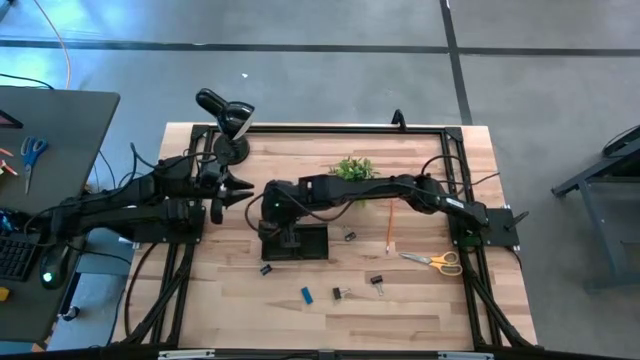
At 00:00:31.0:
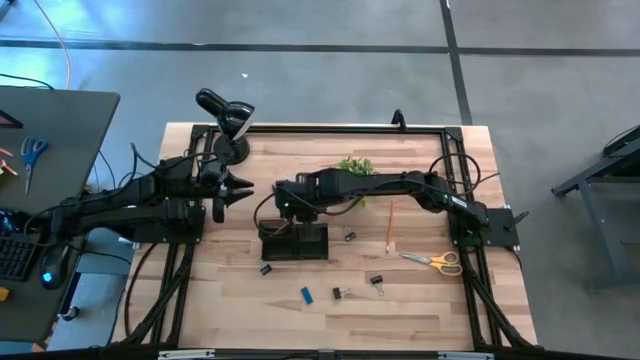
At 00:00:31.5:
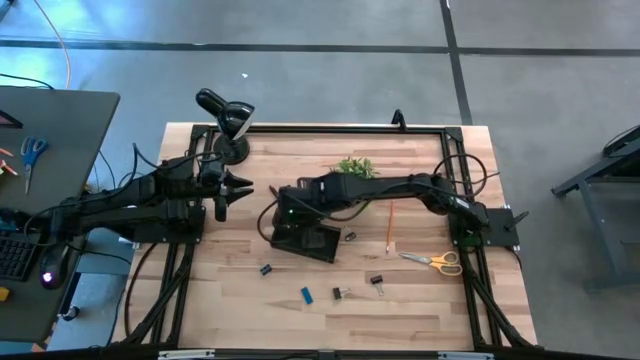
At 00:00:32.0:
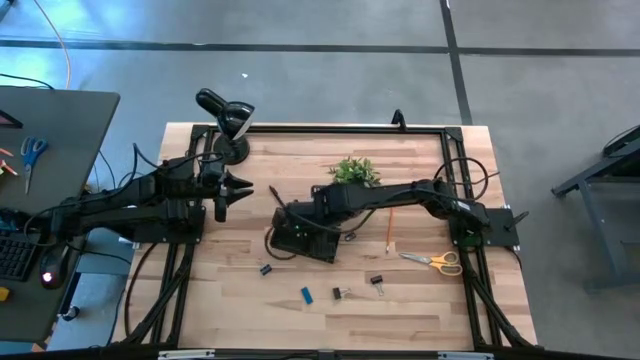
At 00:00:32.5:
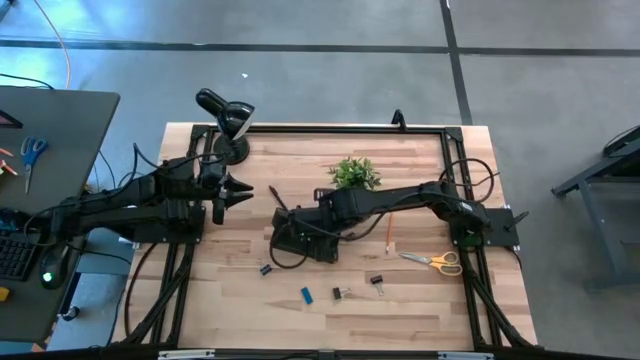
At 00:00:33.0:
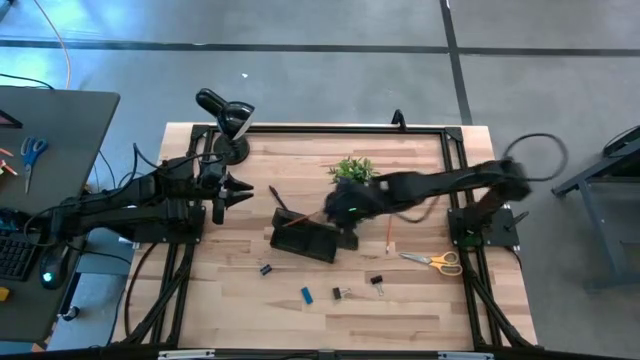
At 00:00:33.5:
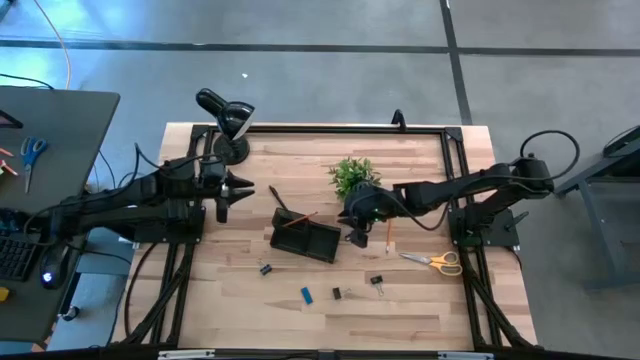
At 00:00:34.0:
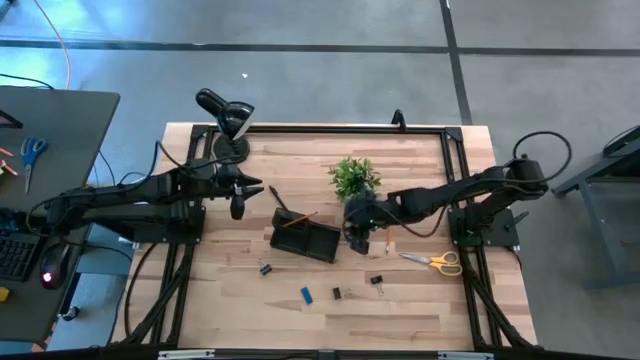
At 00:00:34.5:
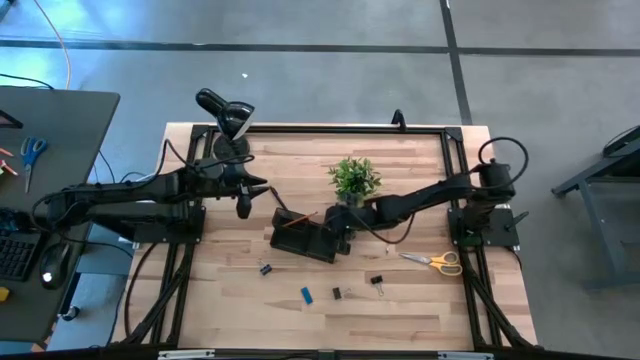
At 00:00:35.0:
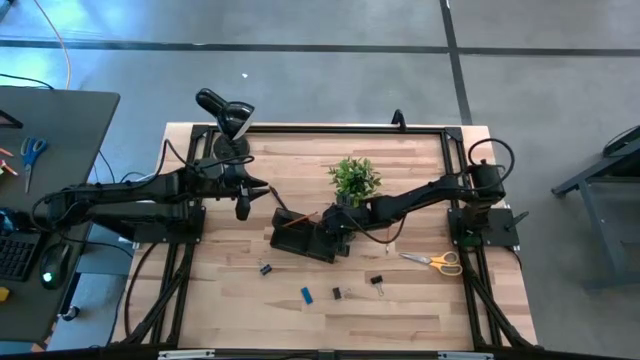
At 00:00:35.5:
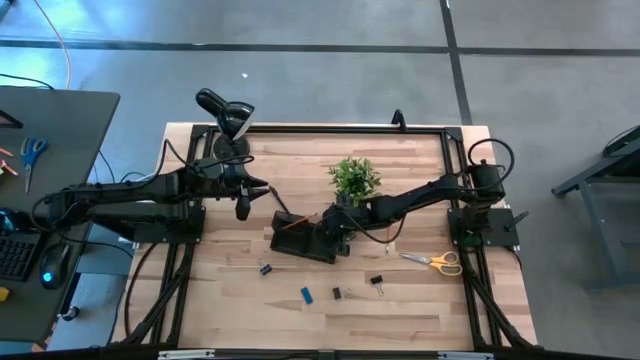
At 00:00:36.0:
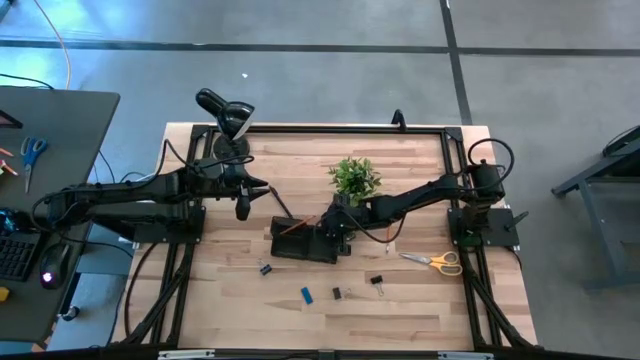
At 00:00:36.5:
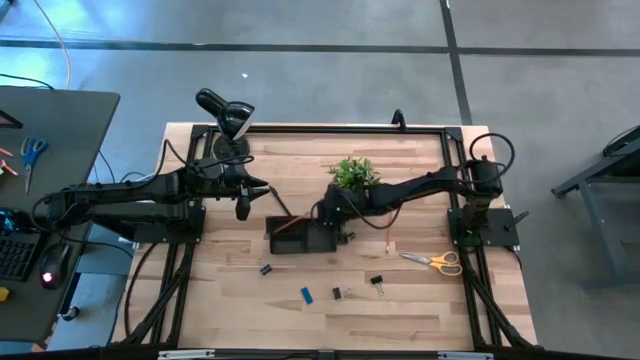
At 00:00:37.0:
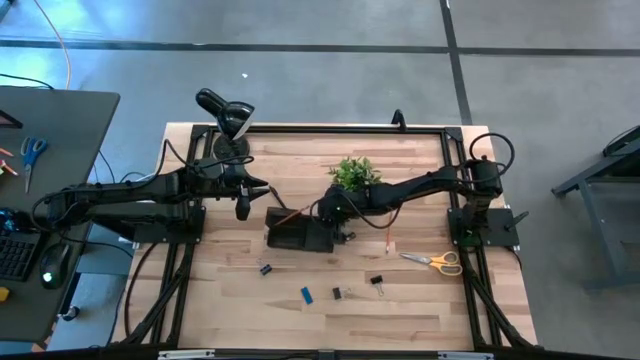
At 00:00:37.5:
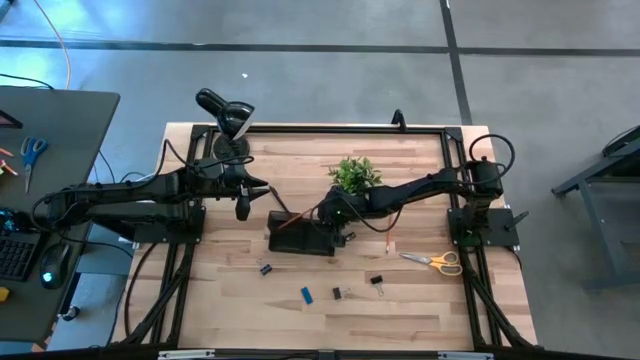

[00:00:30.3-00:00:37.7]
Task: Pick and place office supplies into organizer
Adjust the black desk organizer

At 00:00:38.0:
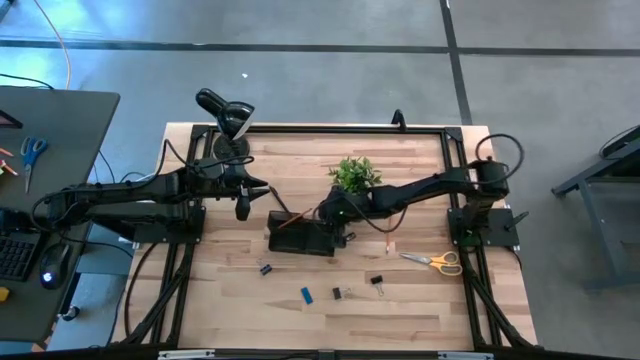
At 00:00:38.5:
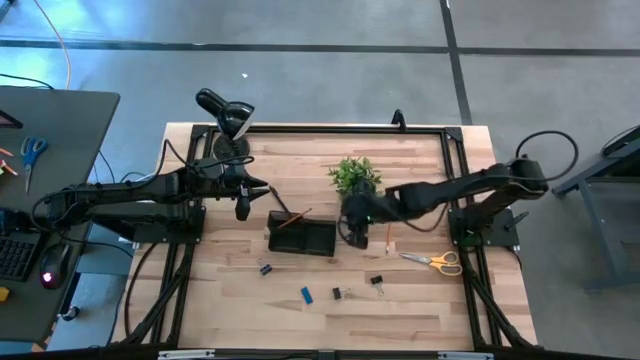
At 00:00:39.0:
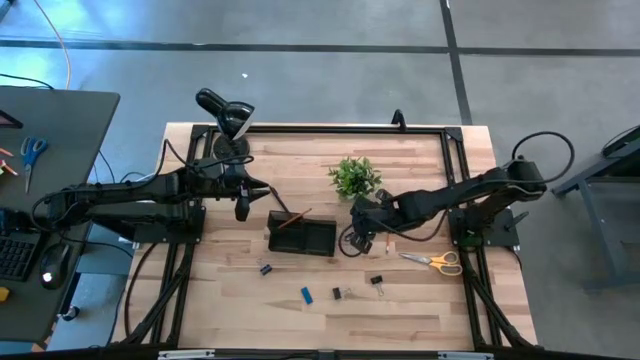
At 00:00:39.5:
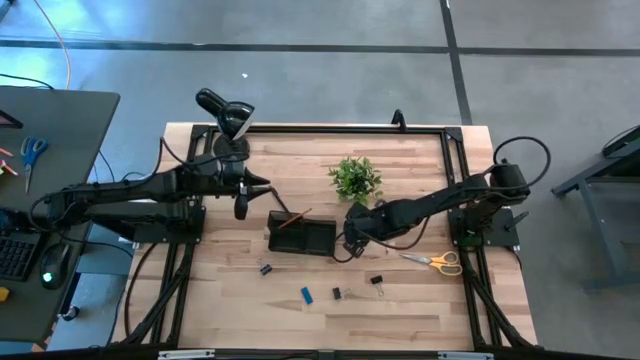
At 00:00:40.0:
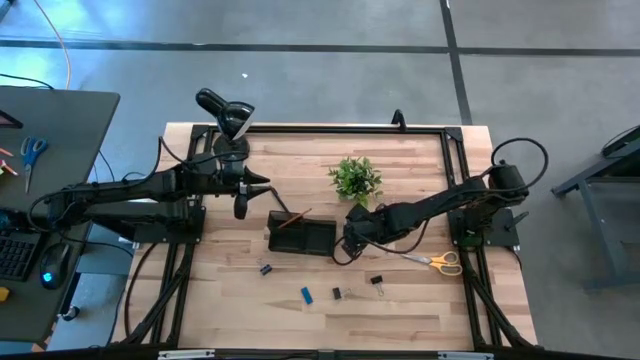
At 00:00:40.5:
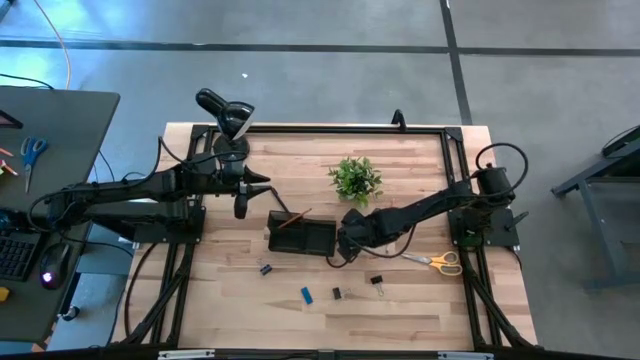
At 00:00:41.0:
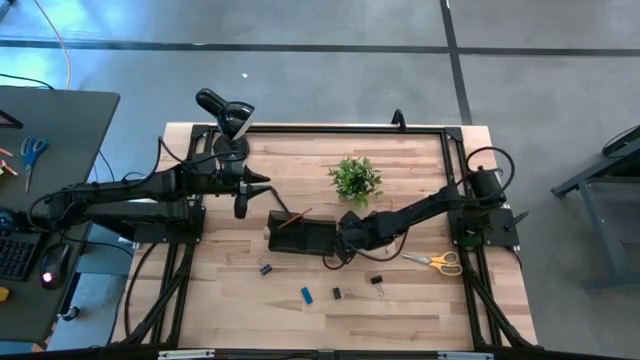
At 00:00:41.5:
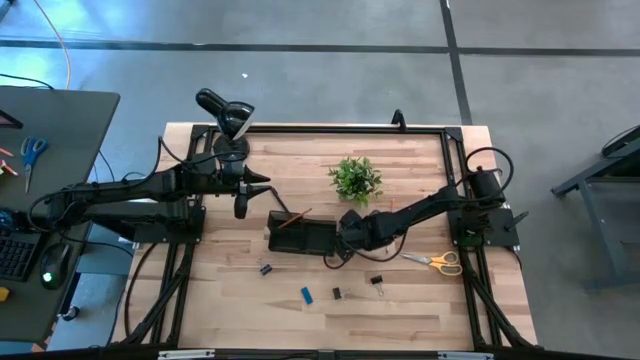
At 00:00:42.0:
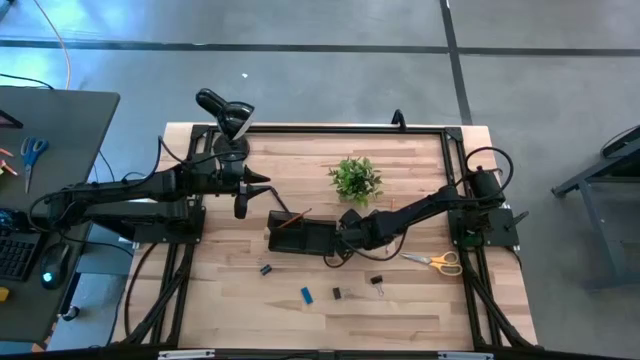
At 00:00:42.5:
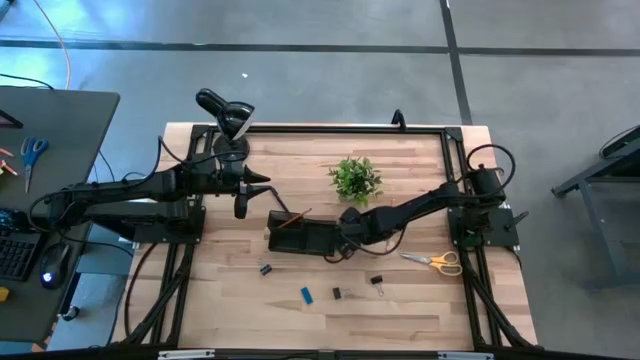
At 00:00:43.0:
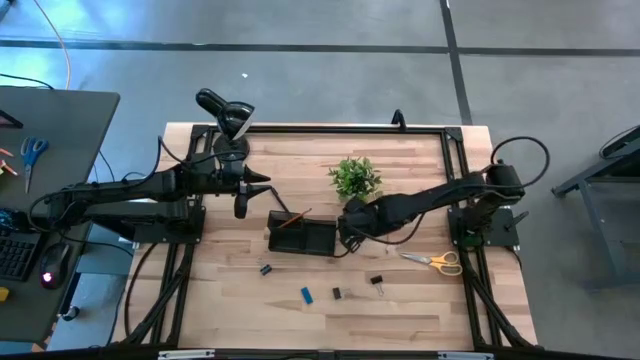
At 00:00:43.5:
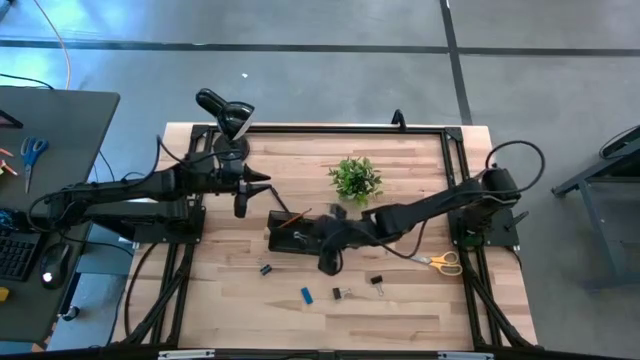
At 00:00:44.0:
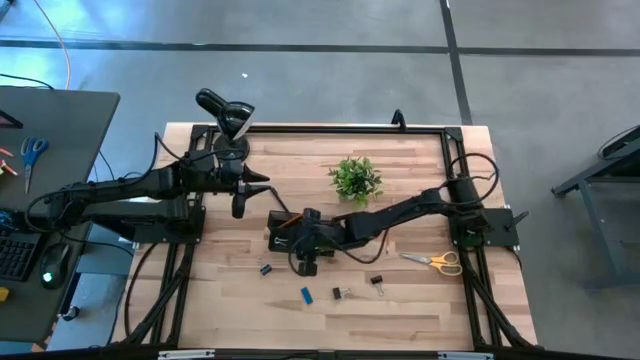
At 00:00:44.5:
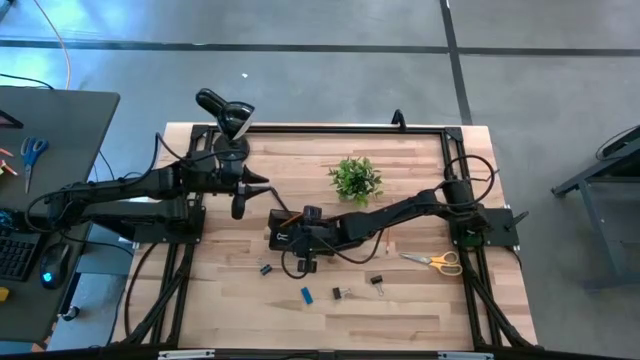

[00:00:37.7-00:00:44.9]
Put the black binder clip into the black desk organizer

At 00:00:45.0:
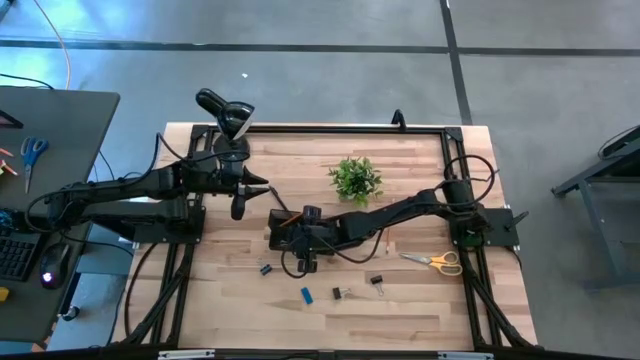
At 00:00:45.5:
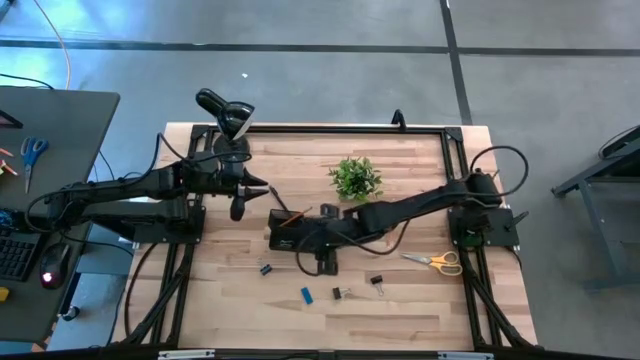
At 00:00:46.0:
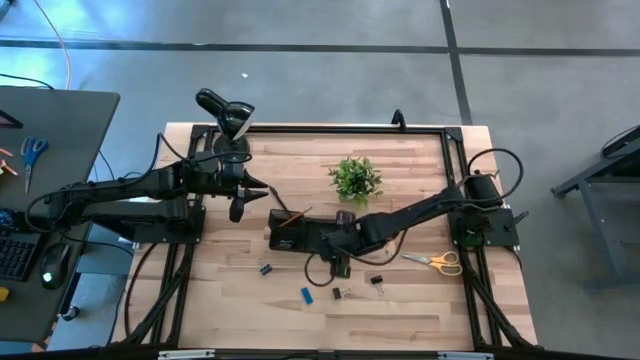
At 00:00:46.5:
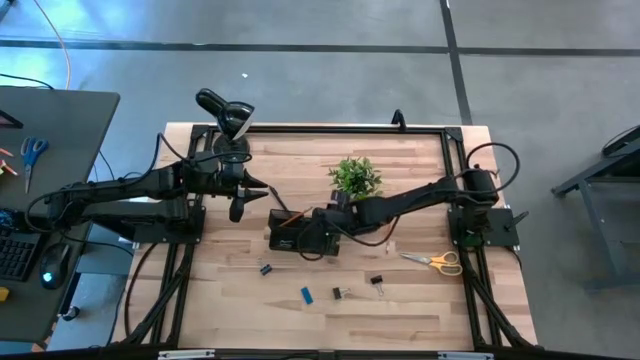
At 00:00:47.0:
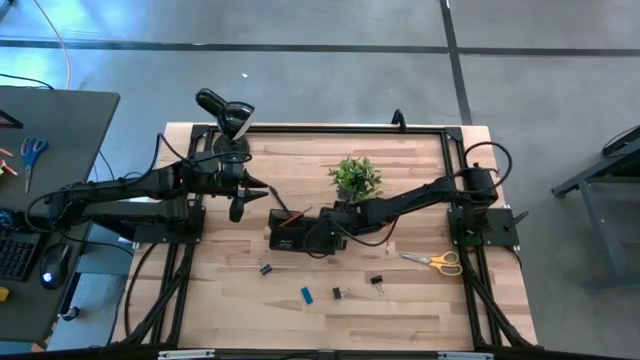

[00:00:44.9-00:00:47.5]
Adjust the black desk organizer

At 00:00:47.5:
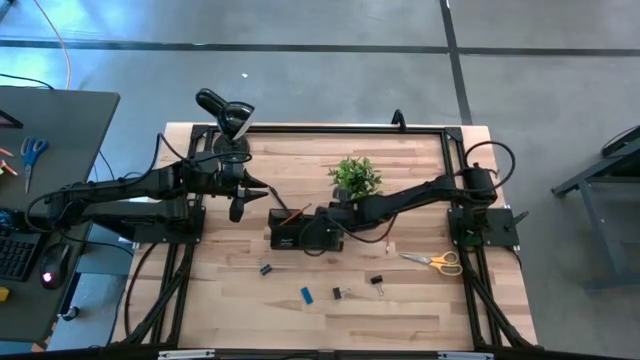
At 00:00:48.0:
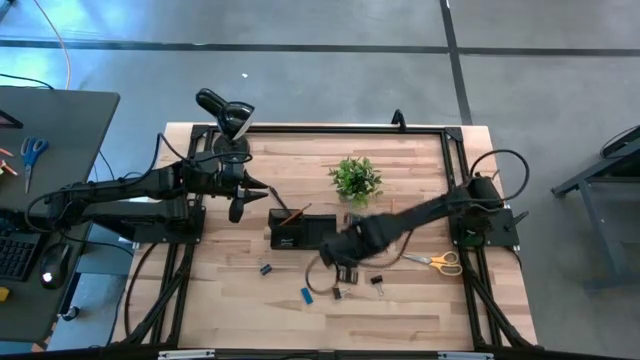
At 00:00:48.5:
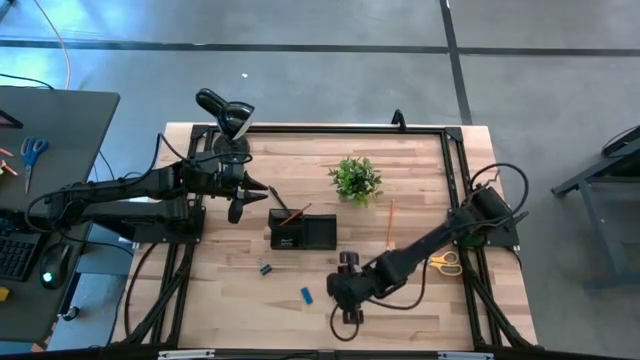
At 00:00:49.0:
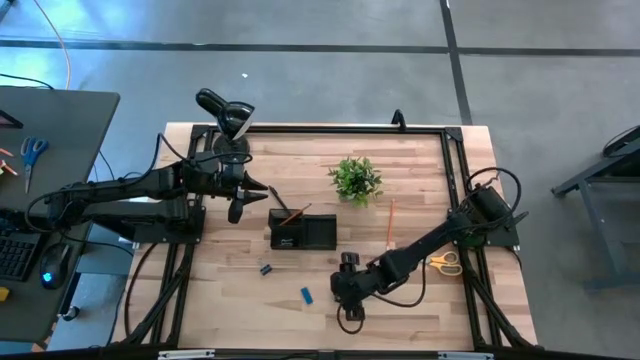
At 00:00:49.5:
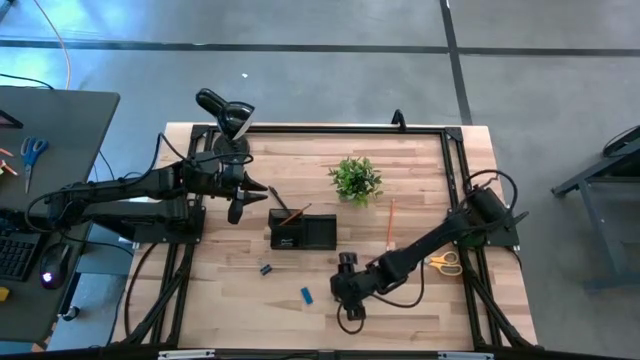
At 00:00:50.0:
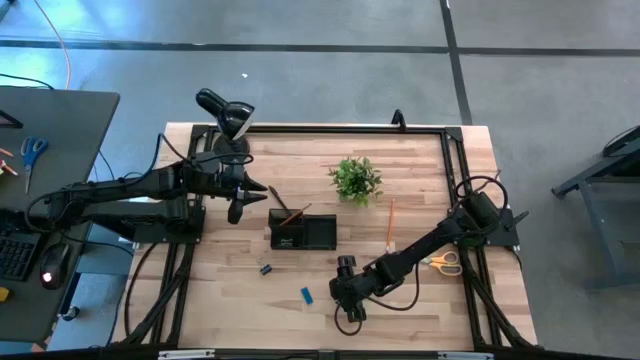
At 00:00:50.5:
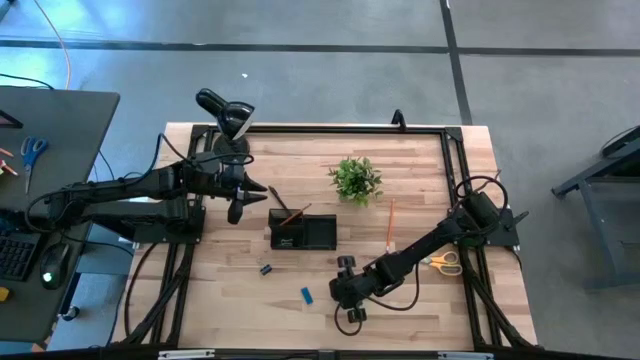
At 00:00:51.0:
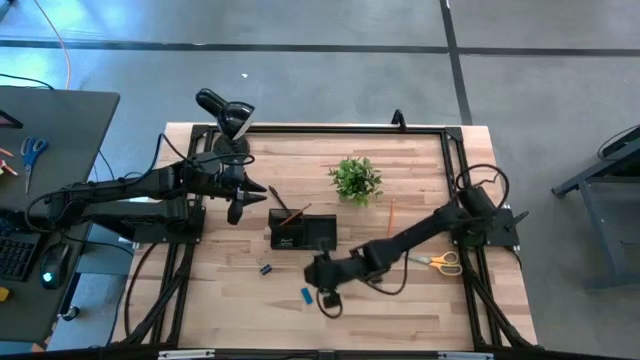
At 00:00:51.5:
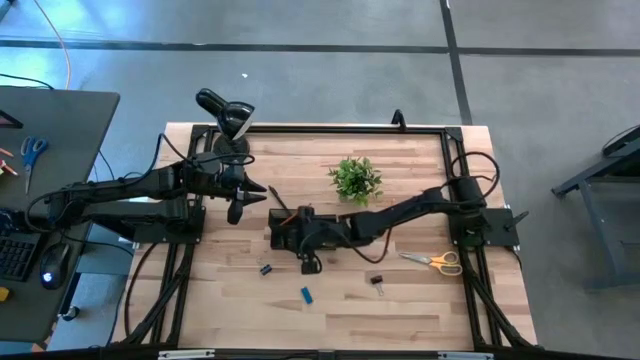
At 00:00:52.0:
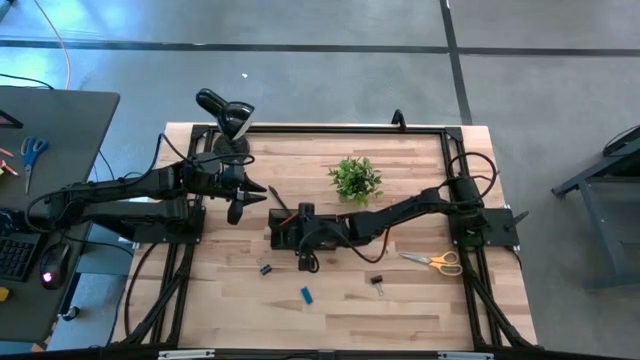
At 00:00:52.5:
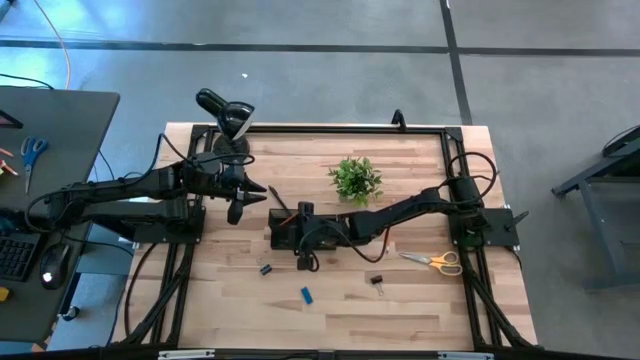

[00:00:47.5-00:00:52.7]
Put the black binder clip into the black desk organizer
